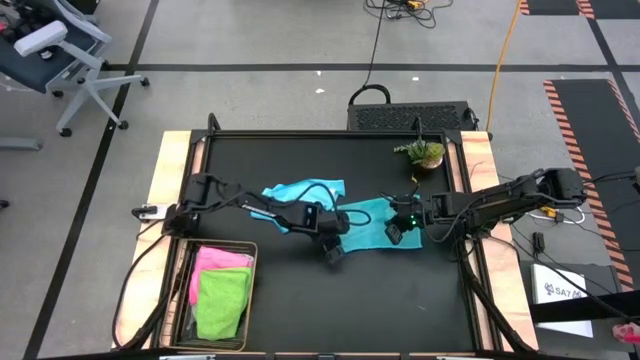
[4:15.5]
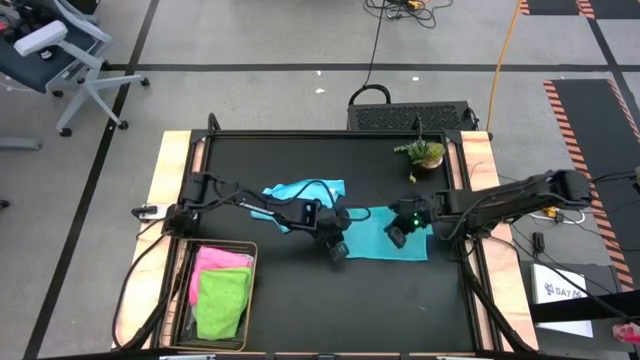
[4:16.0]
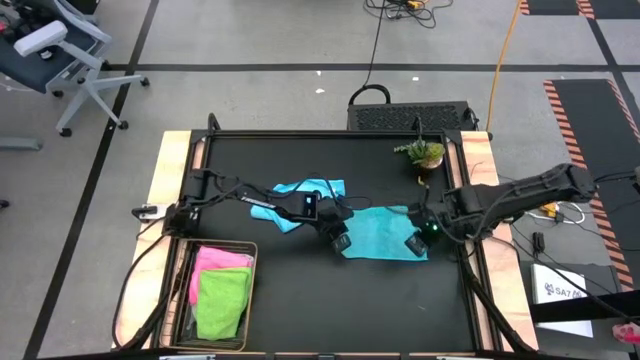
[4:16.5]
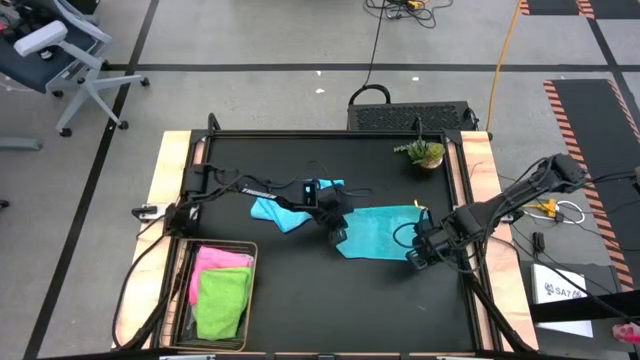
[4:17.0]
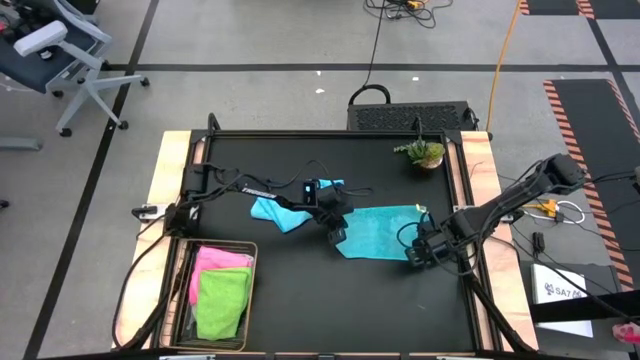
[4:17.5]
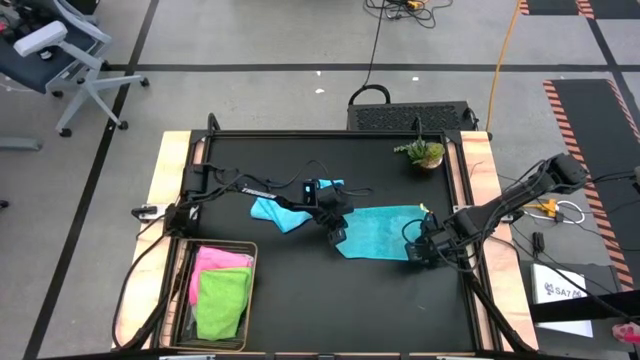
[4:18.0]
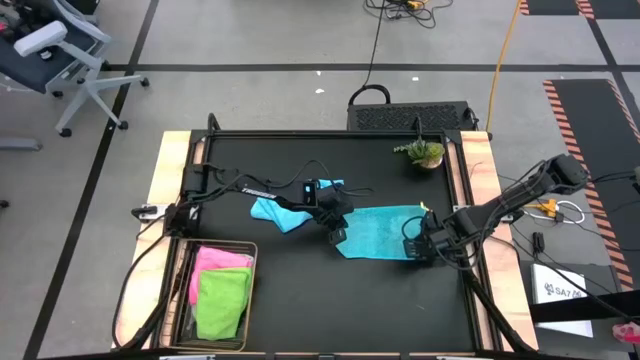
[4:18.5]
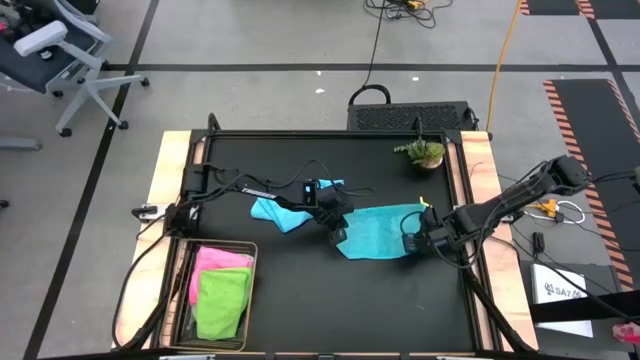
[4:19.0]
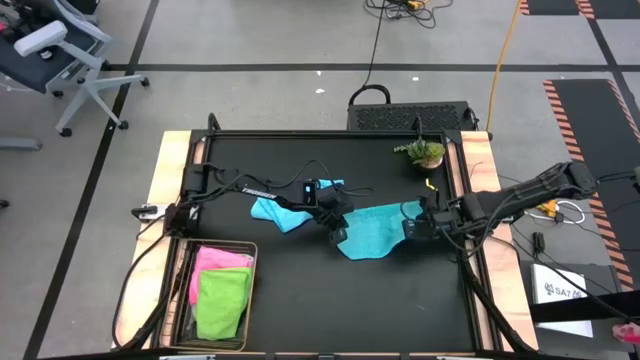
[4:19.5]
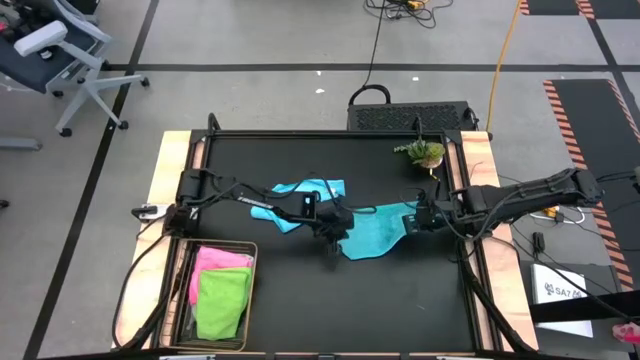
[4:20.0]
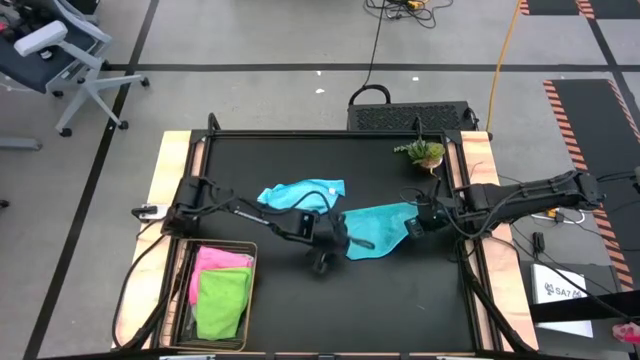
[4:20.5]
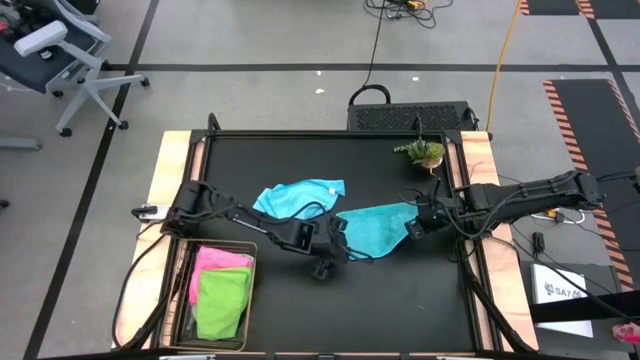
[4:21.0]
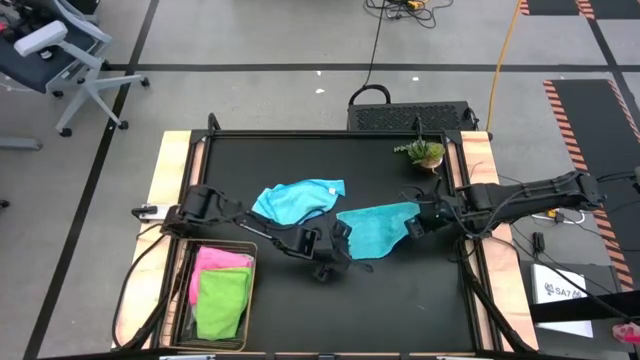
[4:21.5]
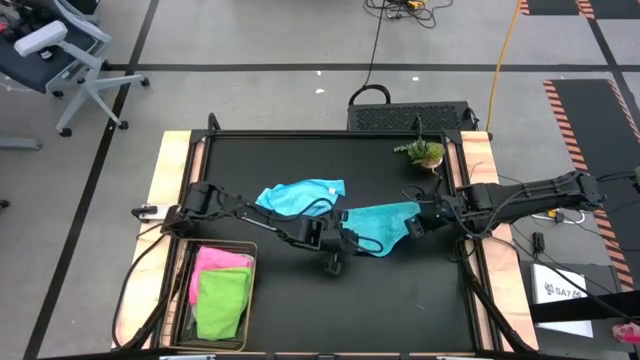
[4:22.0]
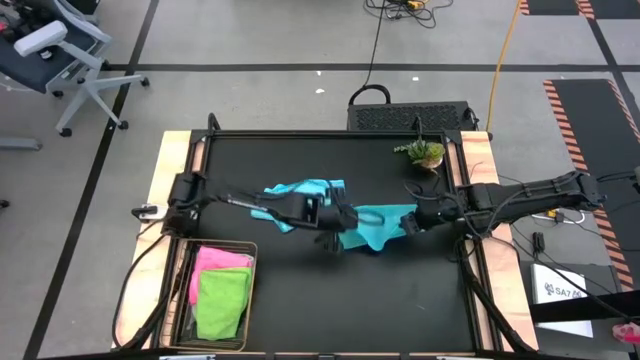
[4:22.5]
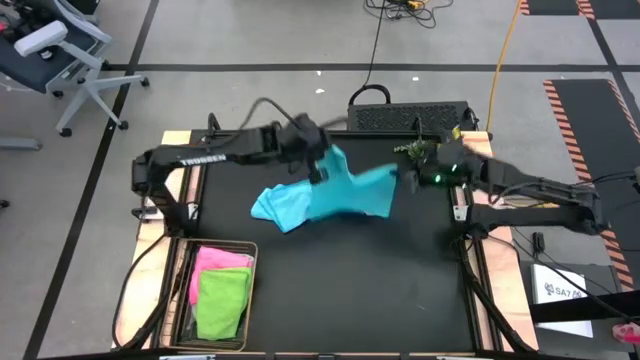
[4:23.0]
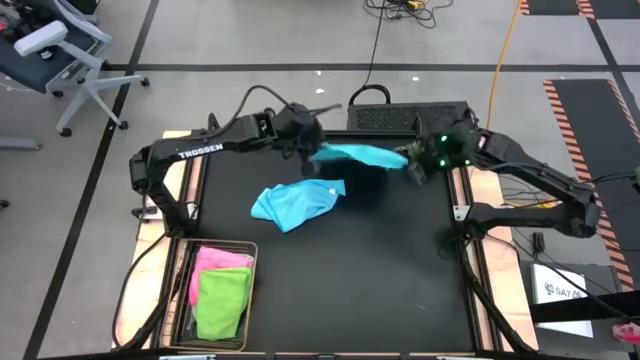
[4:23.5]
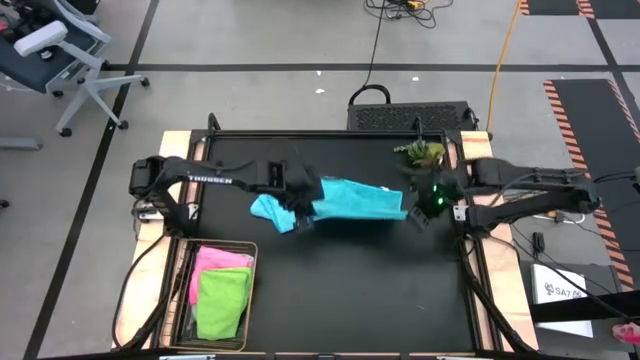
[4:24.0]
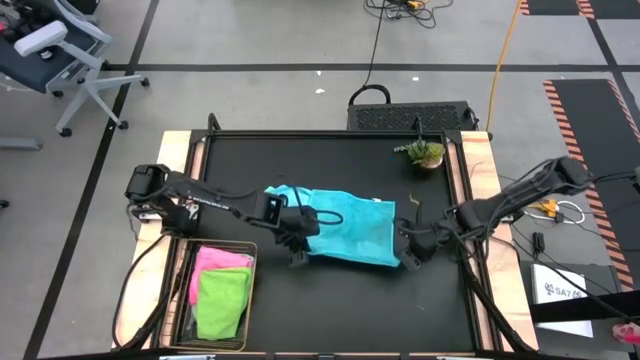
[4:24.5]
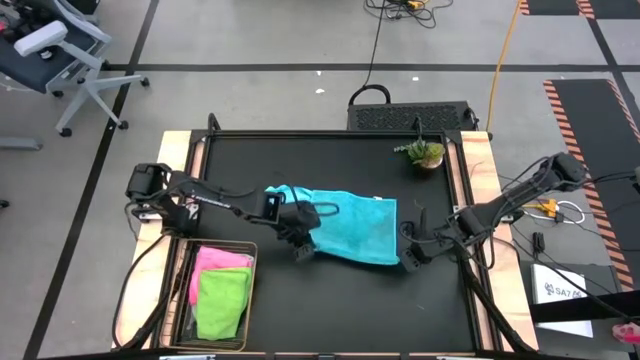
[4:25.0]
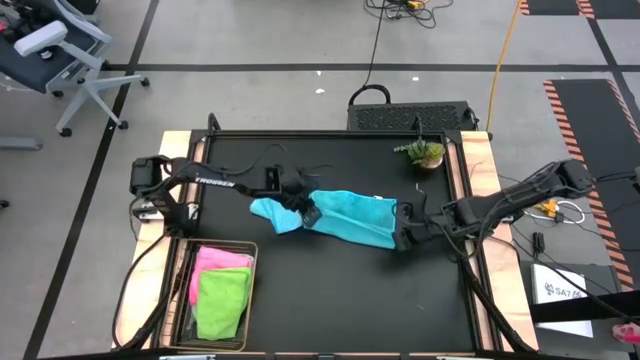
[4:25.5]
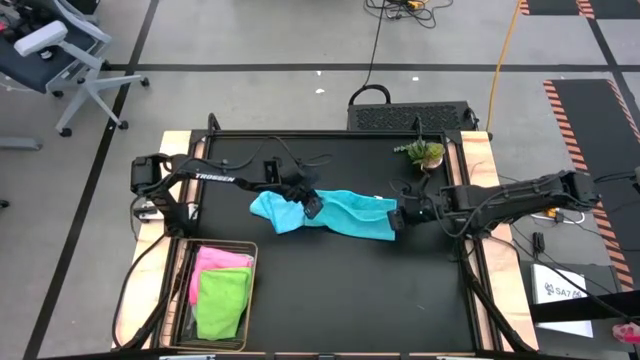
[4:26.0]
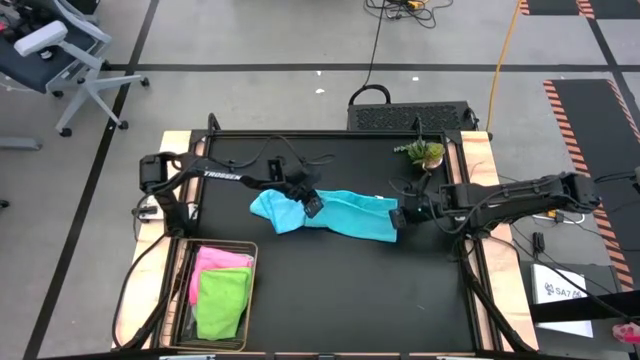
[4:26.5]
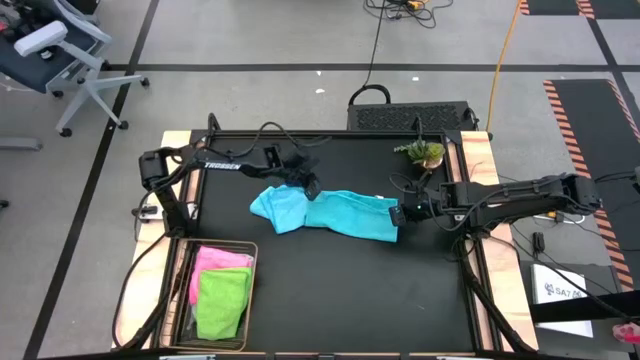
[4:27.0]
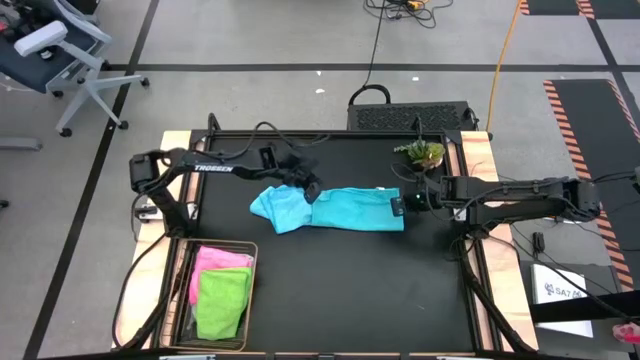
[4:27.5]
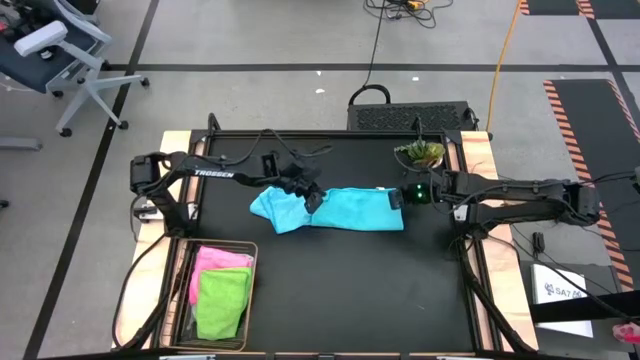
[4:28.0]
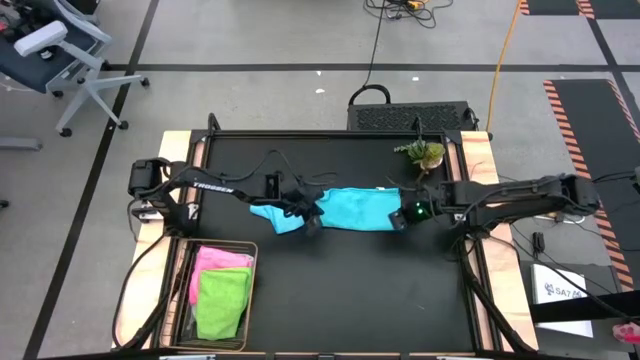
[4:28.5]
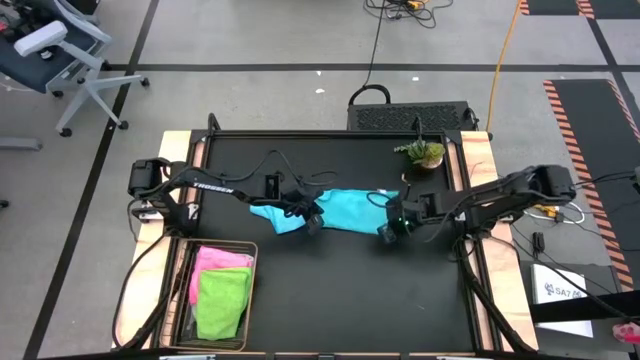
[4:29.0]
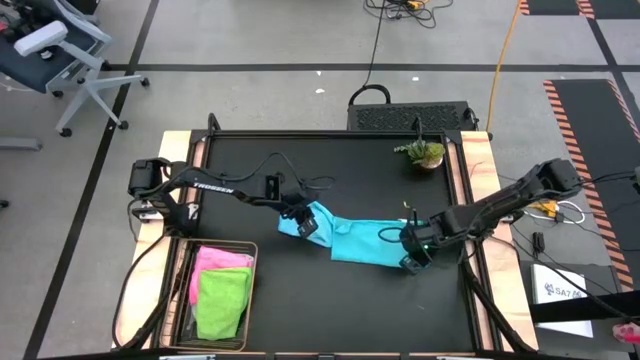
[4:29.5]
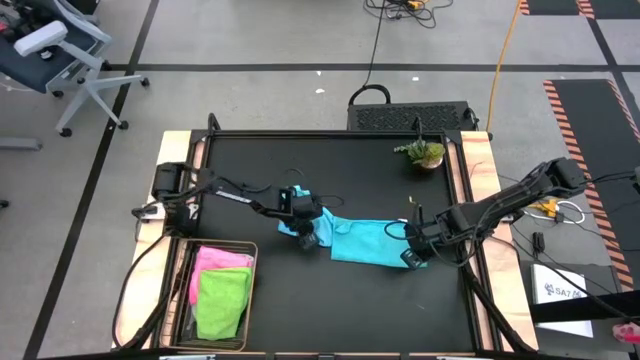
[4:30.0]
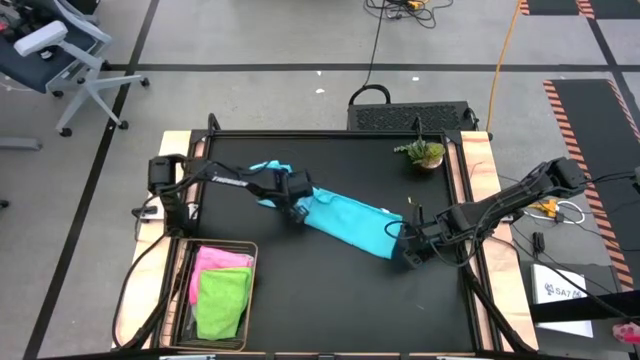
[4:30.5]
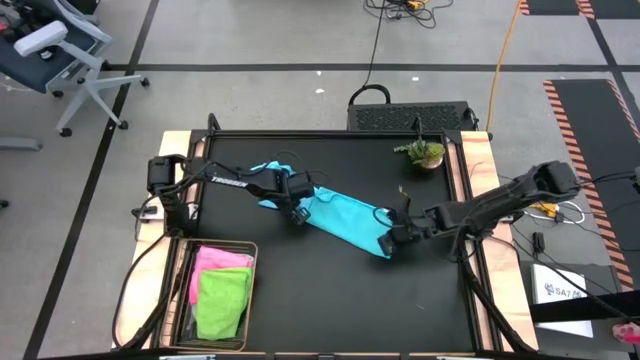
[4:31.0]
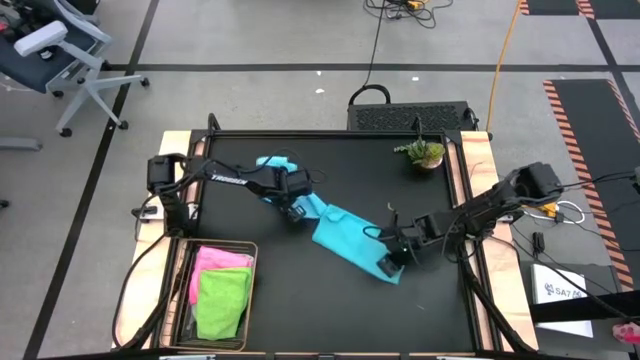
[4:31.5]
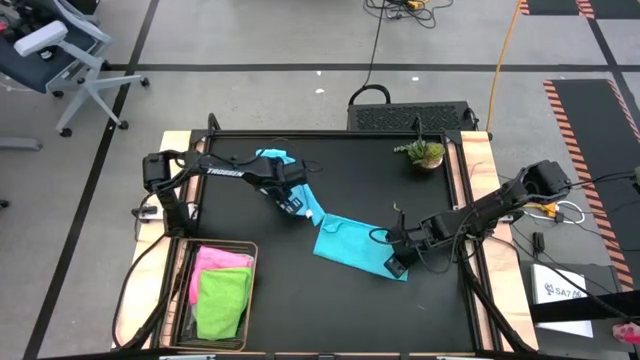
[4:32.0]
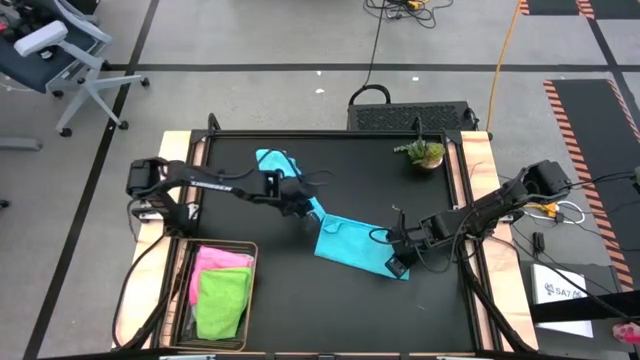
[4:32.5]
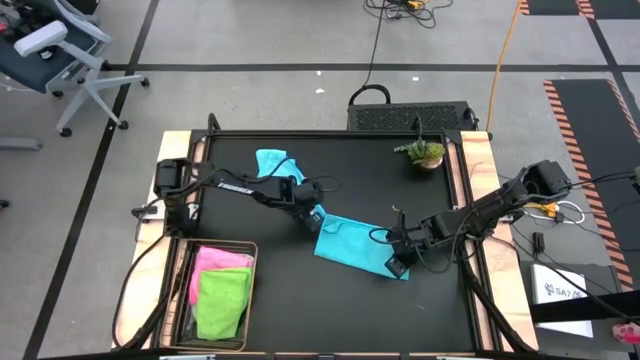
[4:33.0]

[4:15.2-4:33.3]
Task: Fold microfiber towels
Fold the right blue microfiber cloth

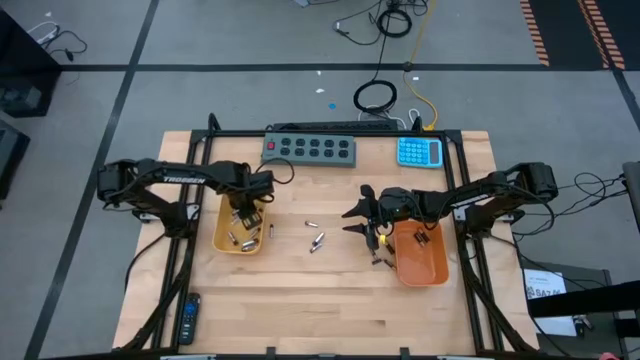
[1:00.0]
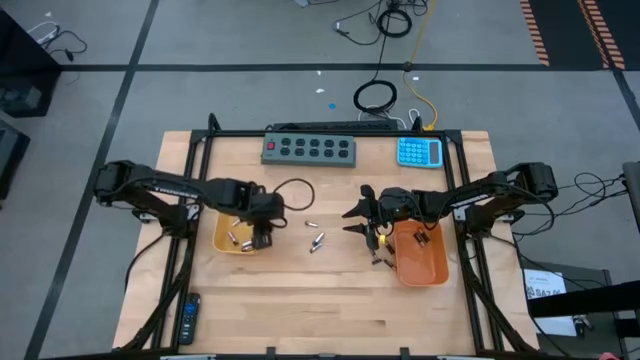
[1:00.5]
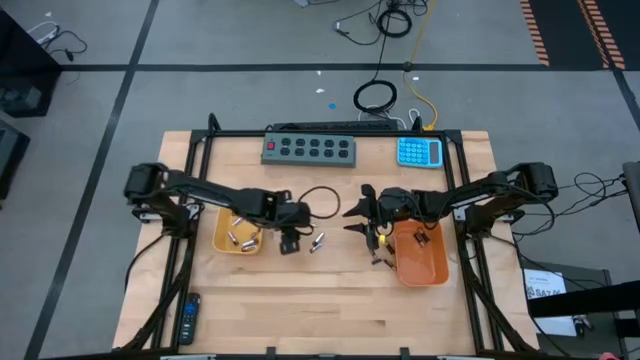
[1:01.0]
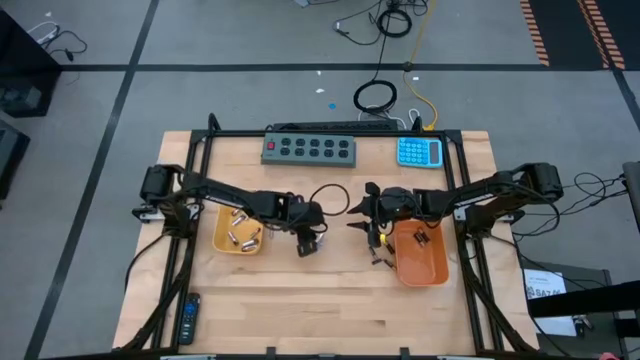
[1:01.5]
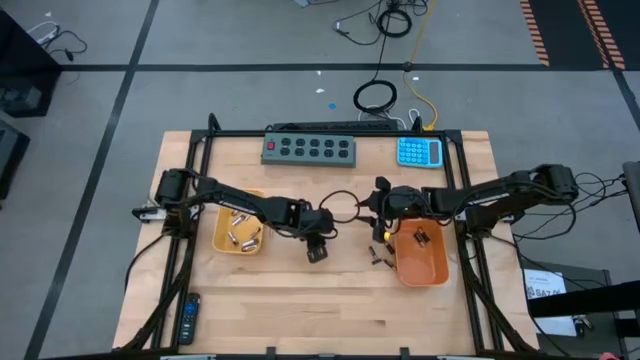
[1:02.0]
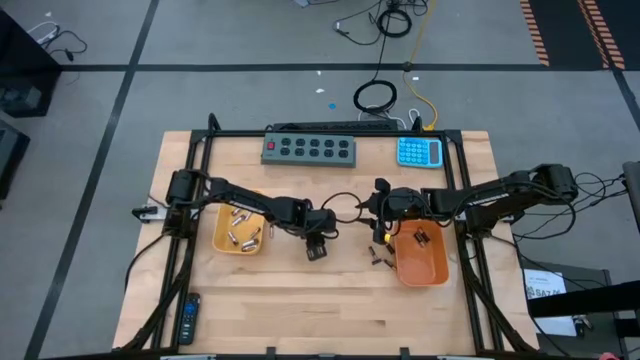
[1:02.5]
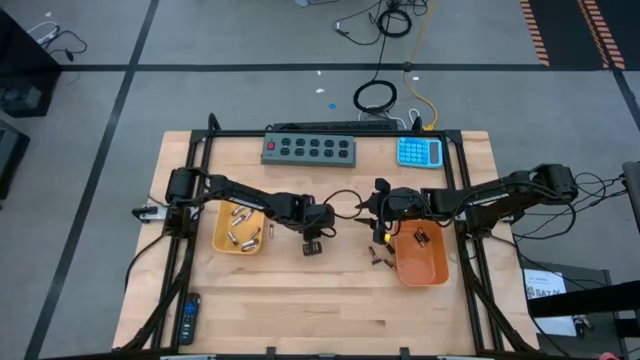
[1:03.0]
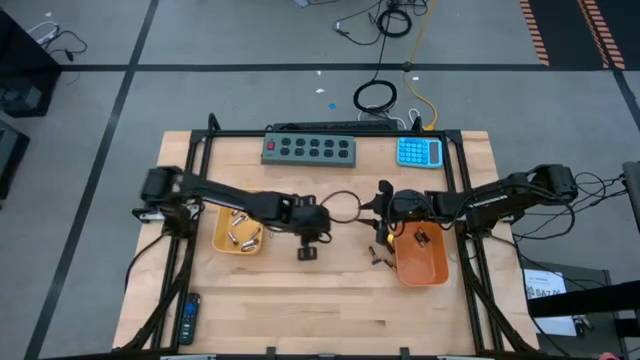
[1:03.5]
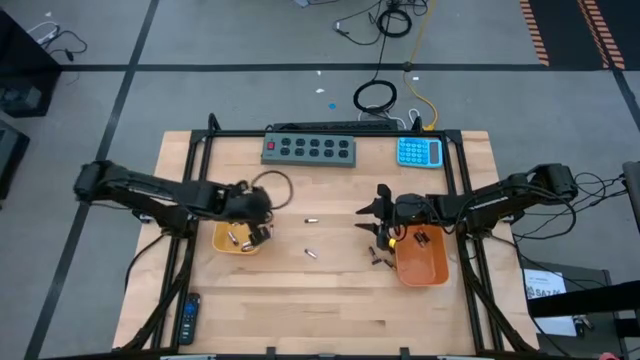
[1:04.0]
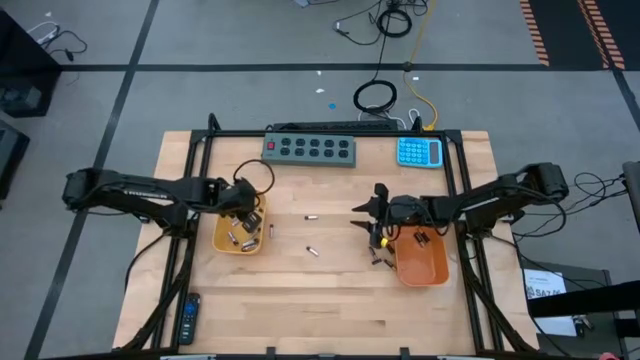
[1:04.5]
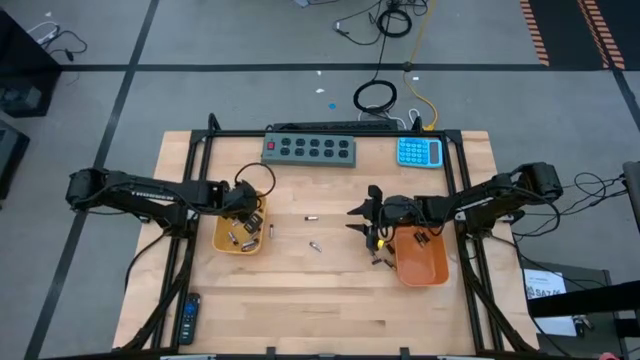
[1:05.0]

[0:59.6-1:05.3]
Task: Sort batteries
Put the silver battery into the yellow bin
